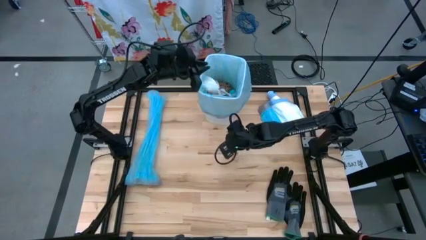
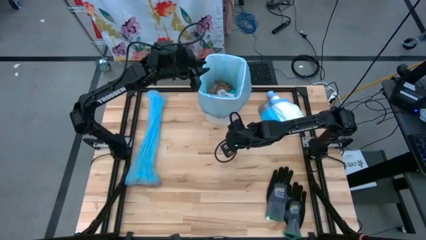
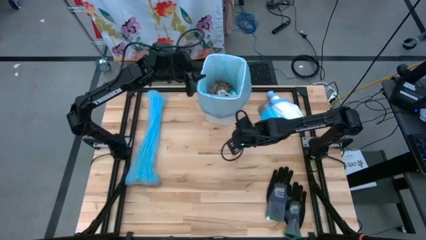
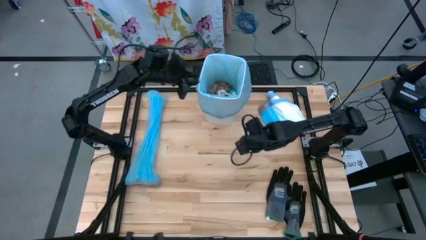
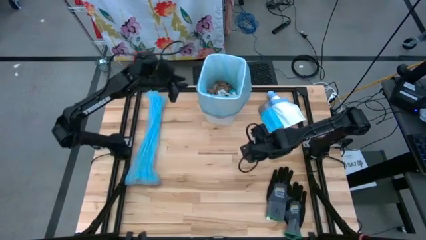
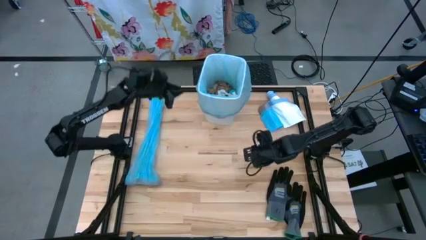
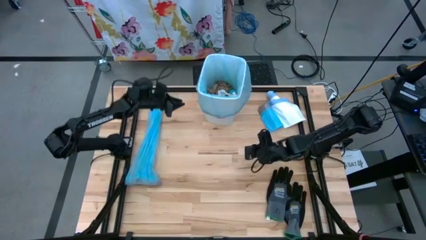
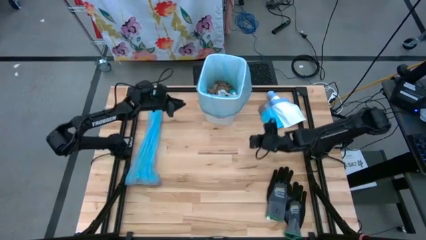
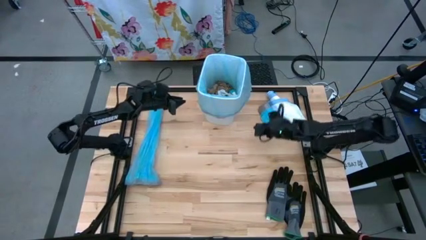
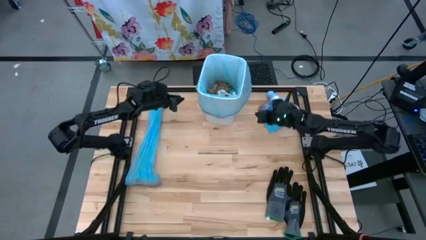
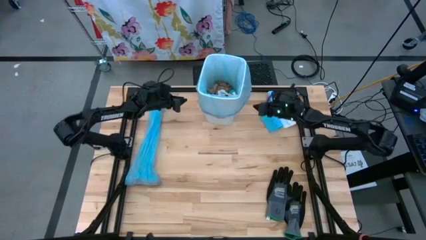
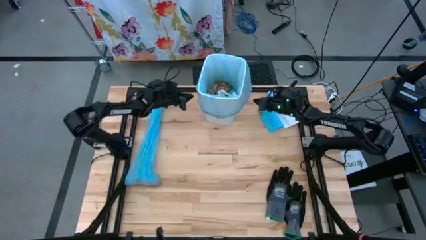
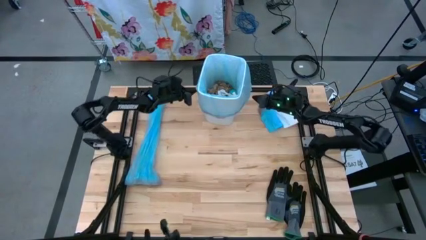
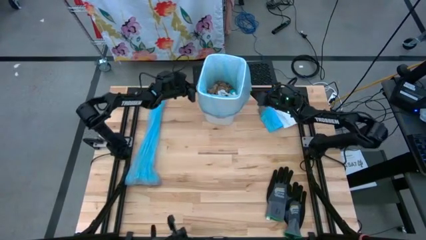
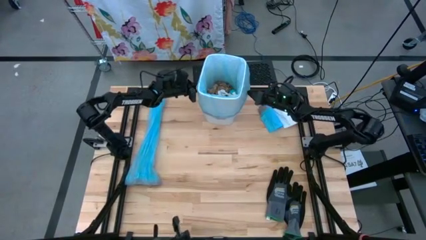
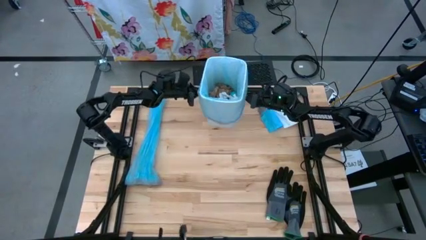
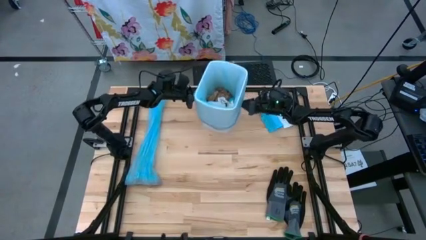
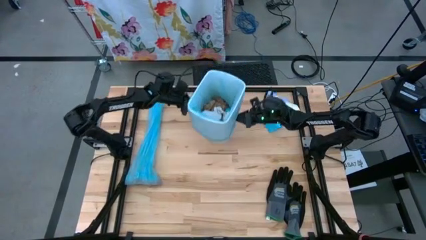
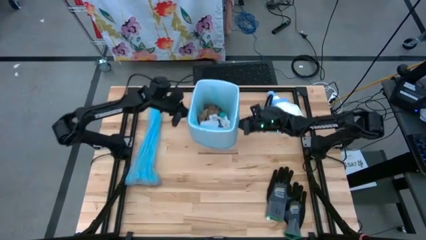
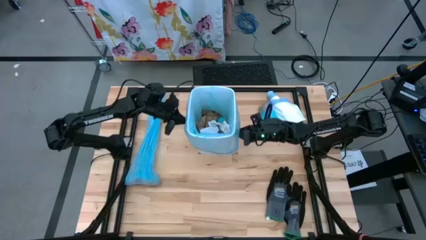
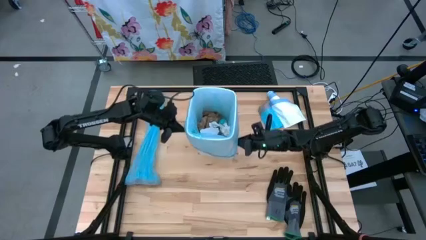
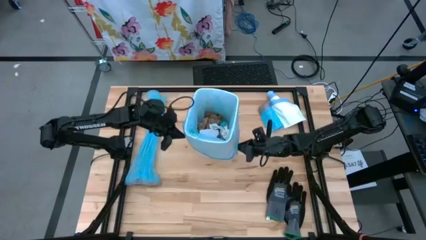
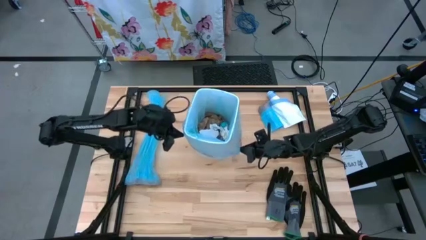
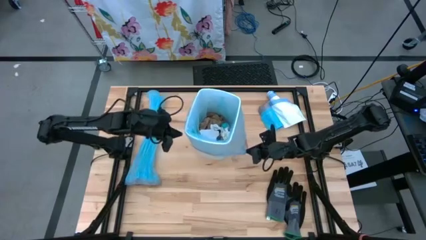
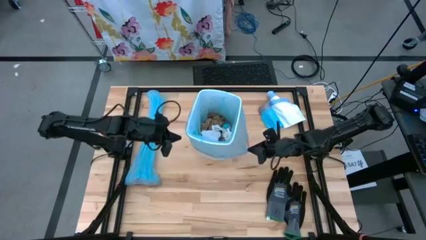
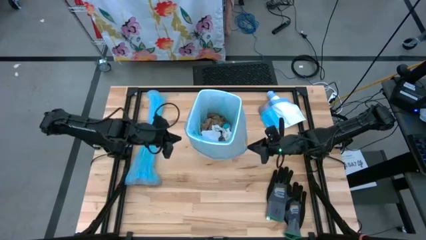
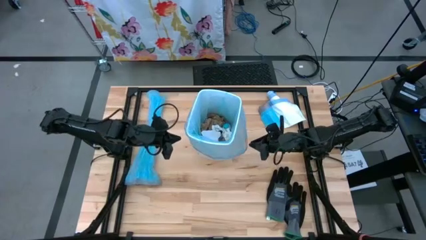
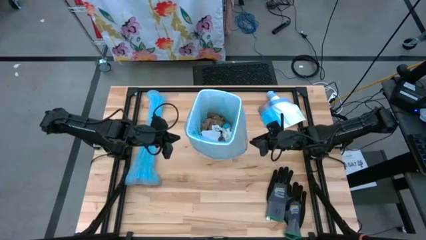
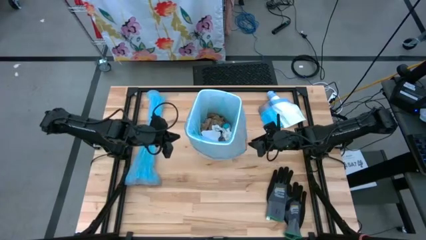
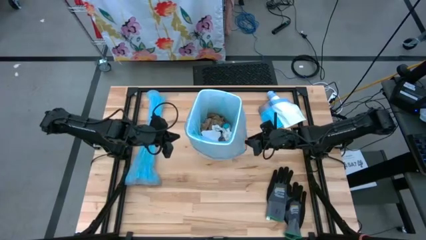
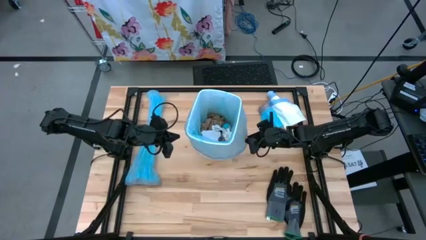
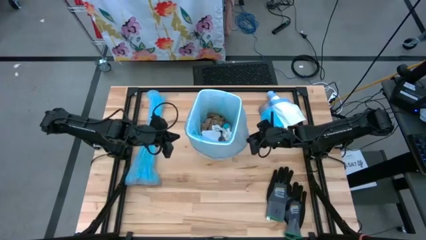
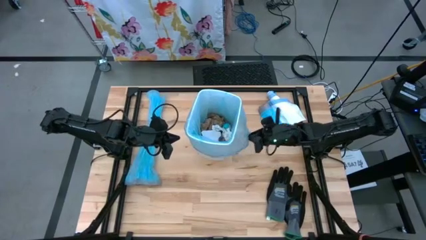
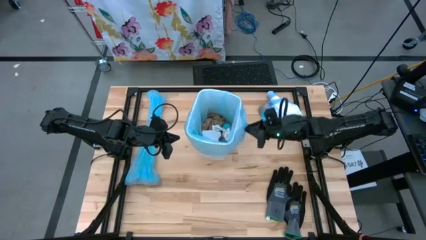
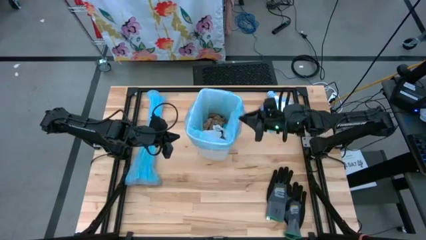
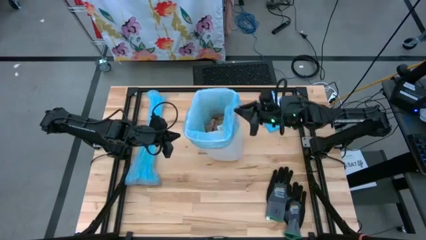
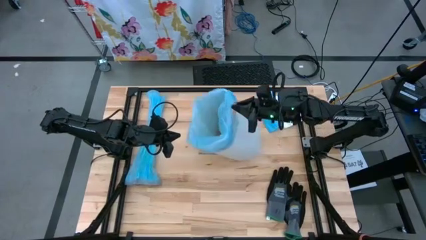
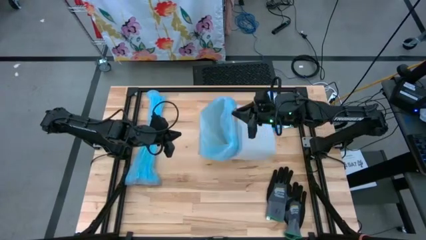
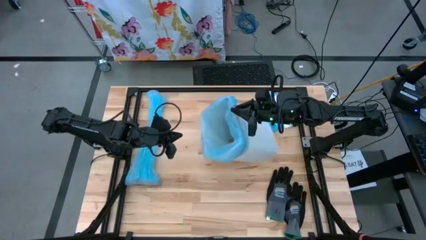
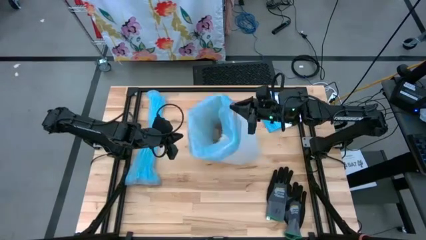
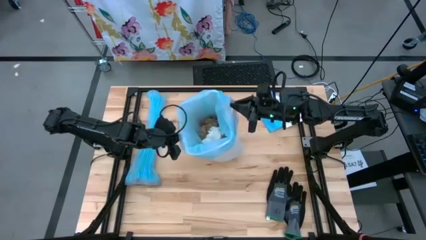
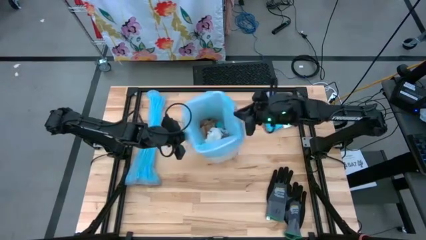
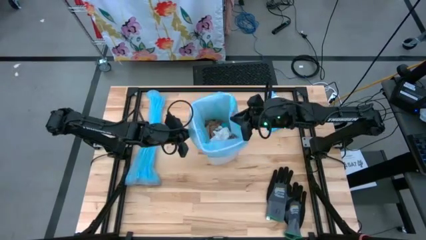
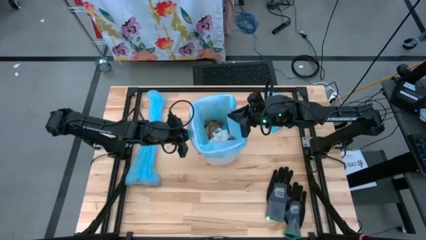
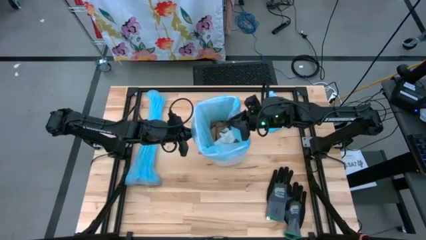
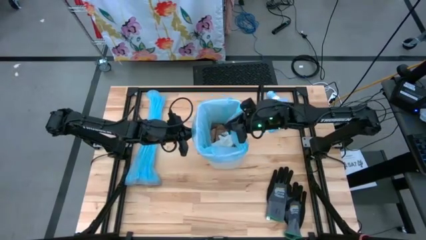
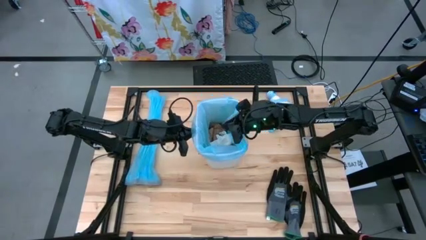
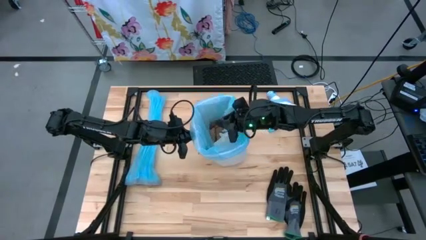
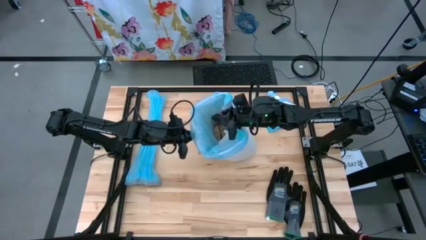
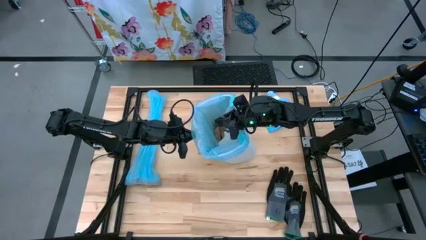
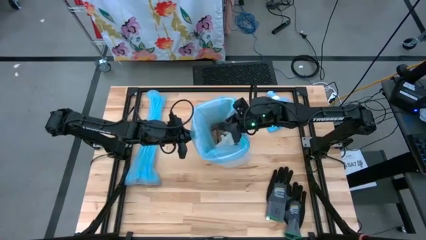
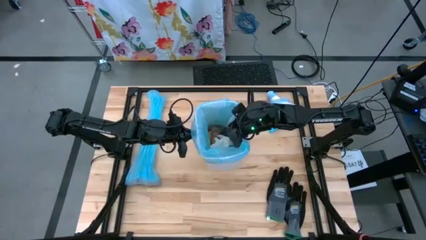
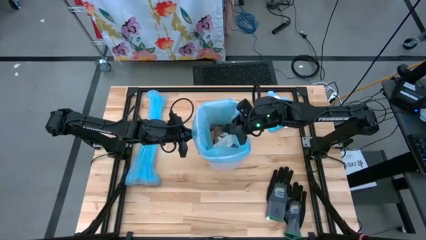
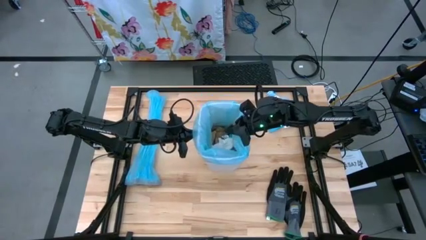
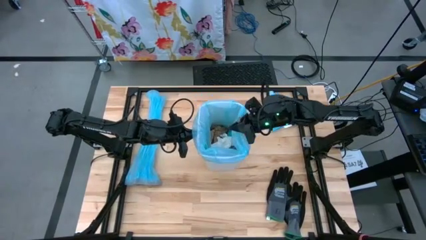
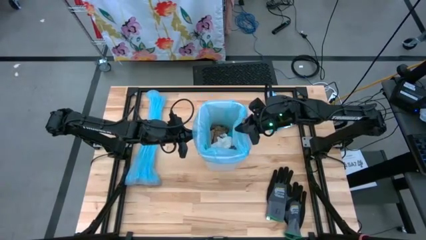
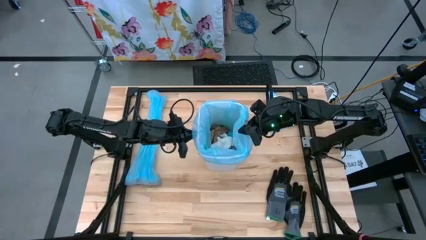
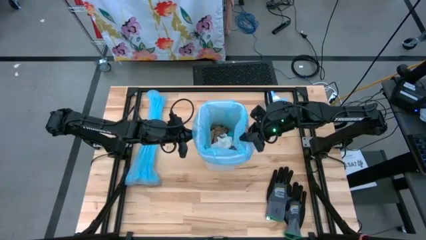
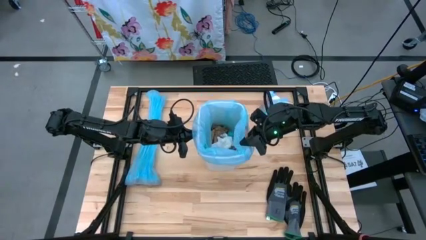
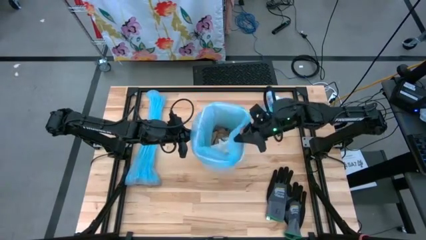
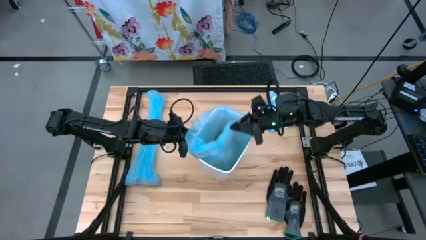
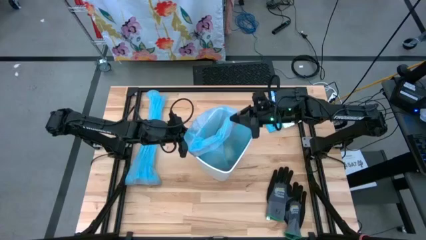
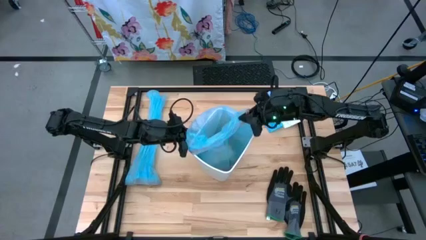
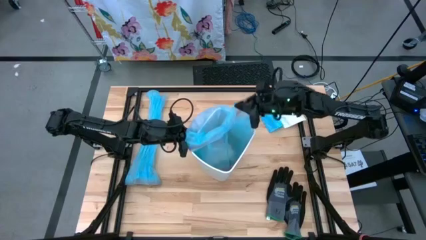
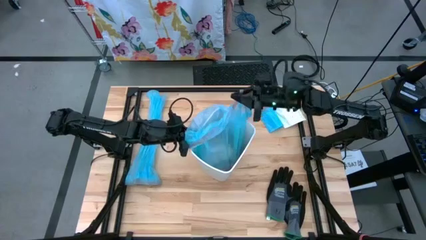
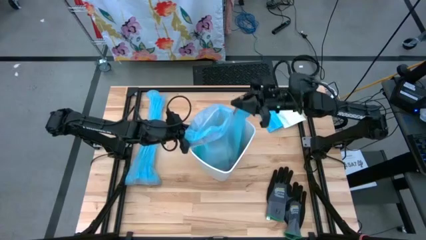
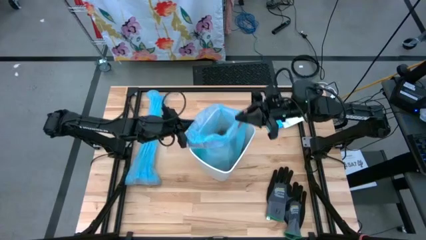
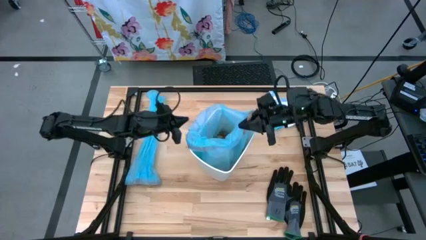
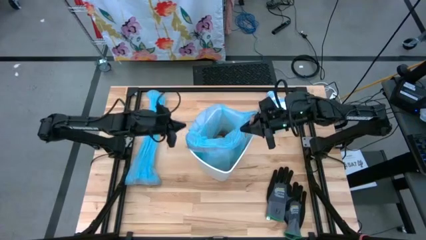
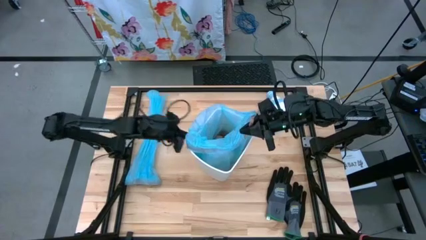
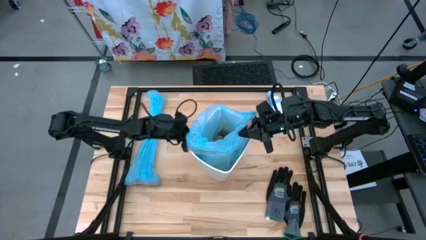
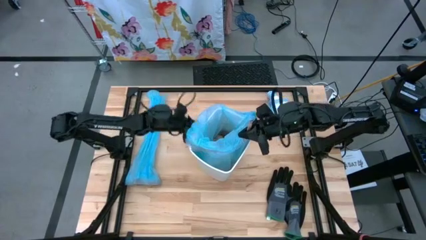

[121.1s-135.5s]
Task: place trash/remove bag and relplace
Remove the blue trash bag from the white trash bin

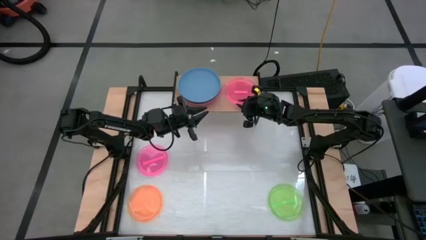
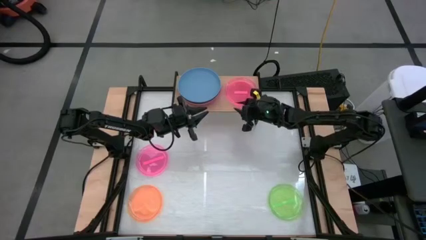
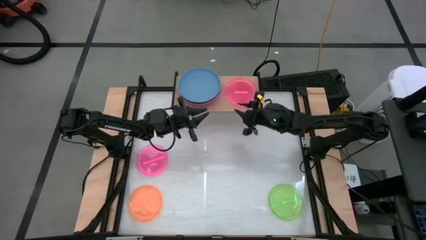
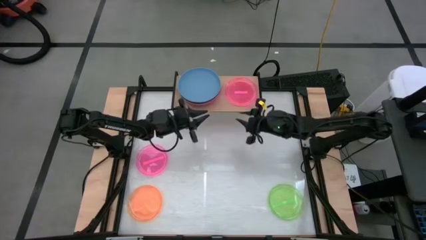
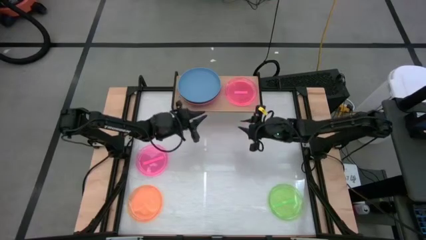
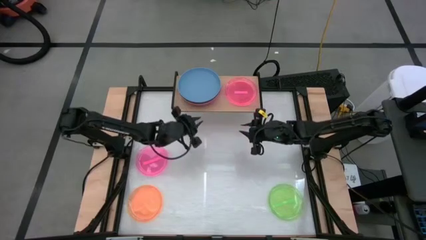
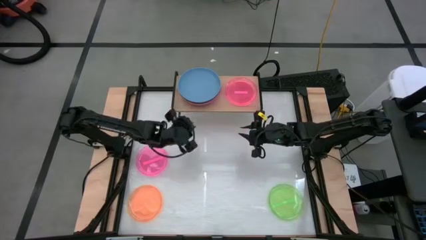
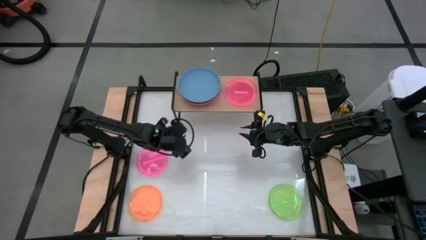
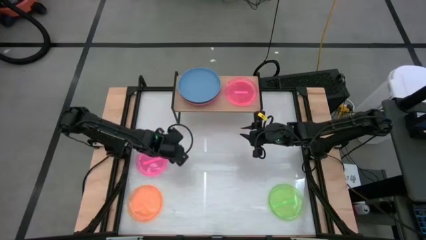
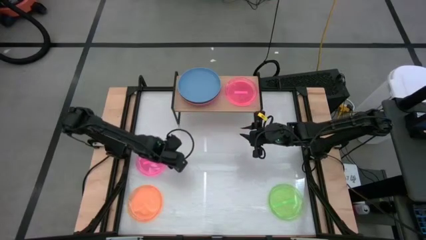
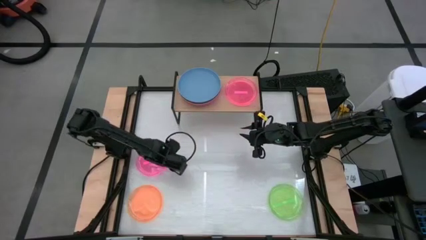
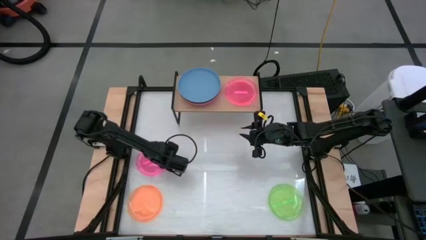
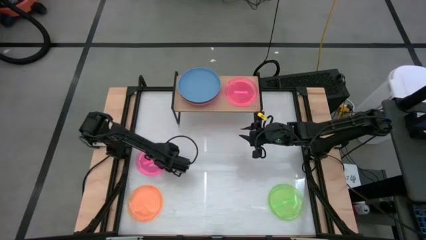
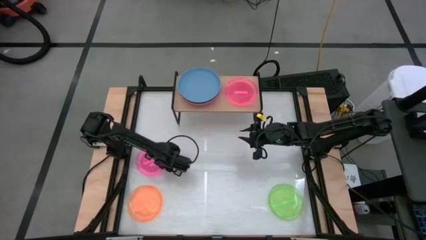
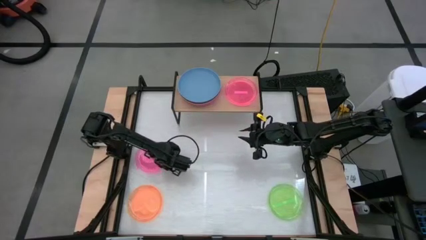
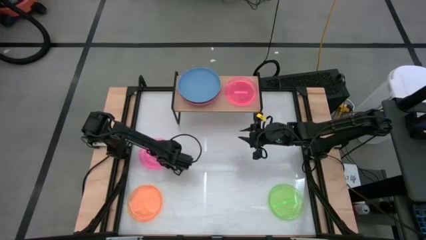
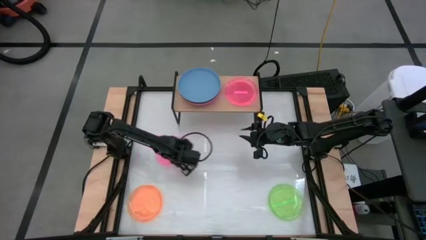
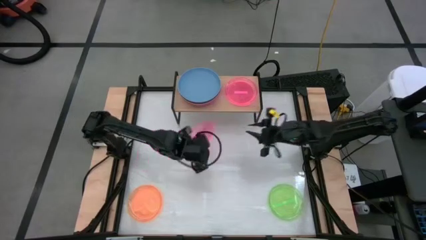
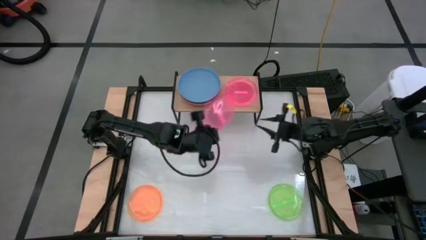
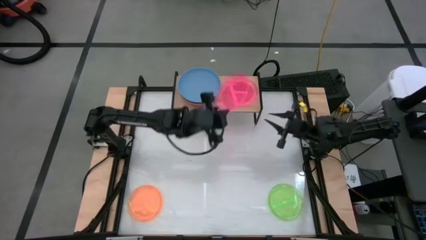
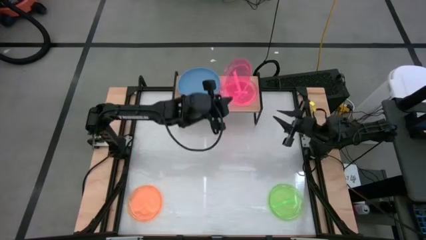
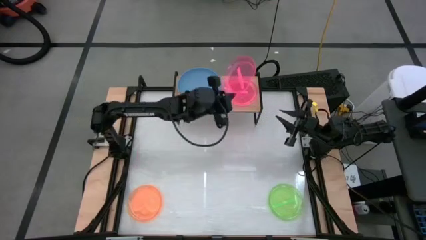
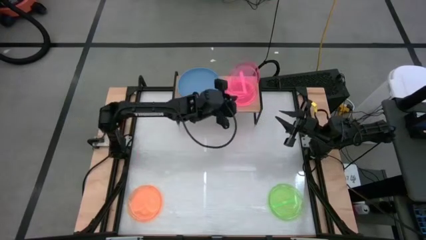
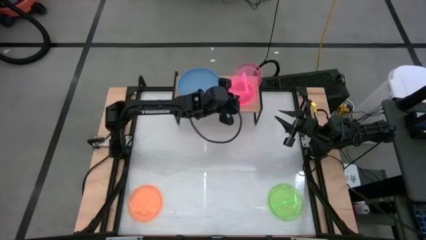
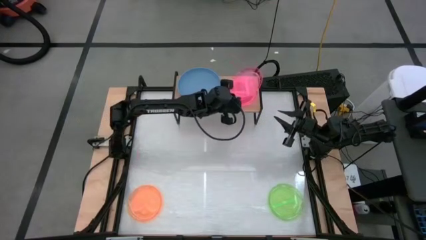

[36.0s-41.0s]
Task: Place and stack plates onto a shelf
Stack the pink plate on the pink plate on the shelf
